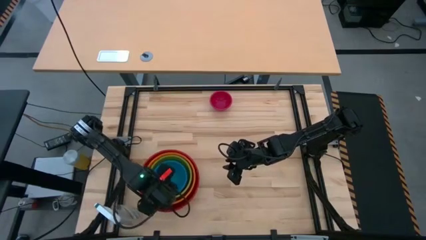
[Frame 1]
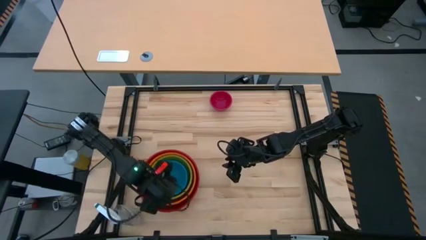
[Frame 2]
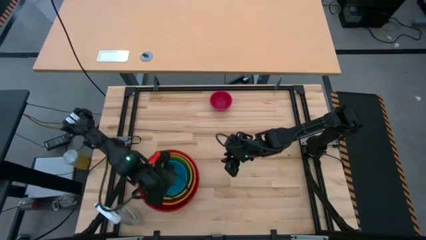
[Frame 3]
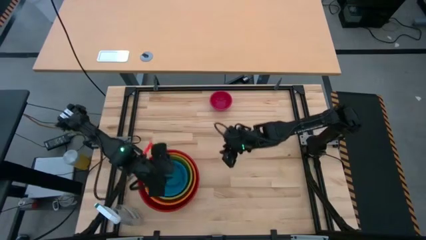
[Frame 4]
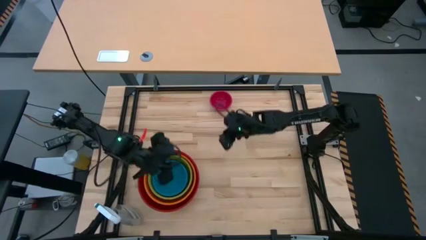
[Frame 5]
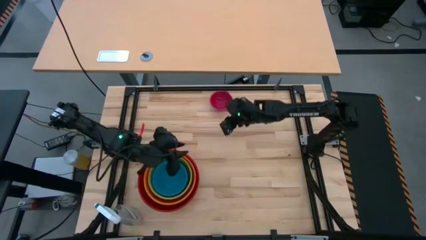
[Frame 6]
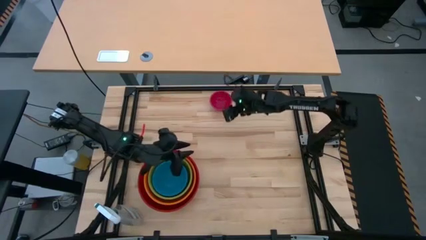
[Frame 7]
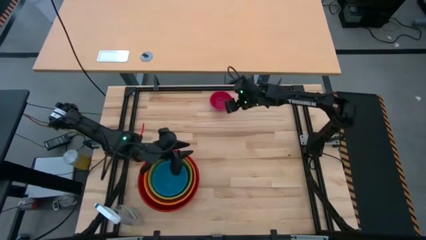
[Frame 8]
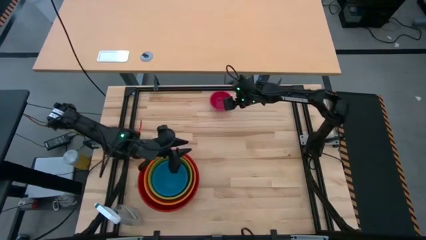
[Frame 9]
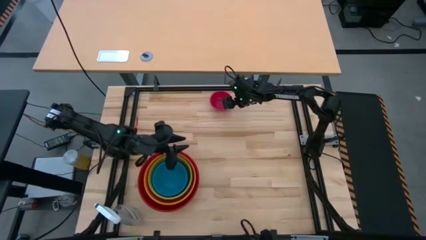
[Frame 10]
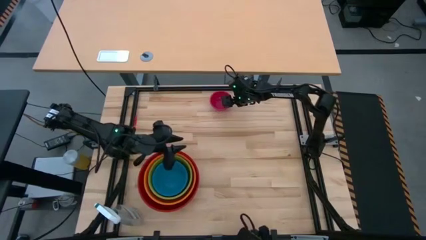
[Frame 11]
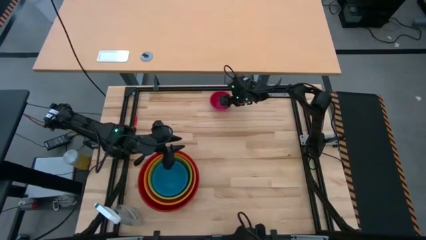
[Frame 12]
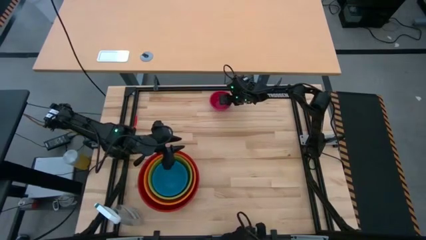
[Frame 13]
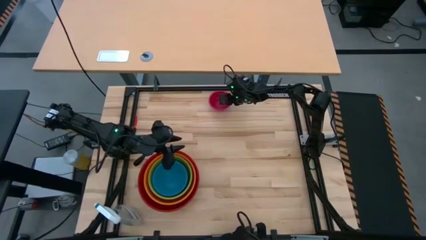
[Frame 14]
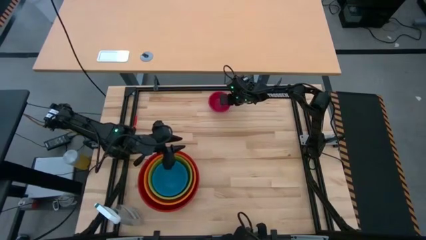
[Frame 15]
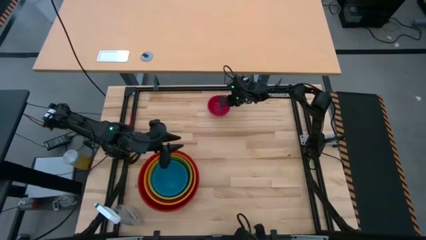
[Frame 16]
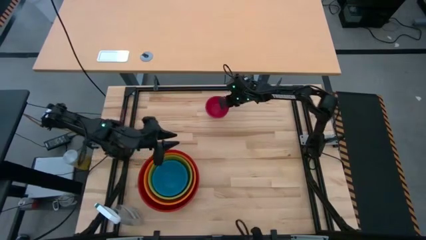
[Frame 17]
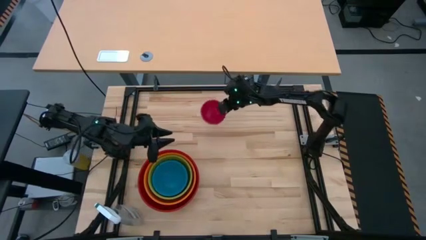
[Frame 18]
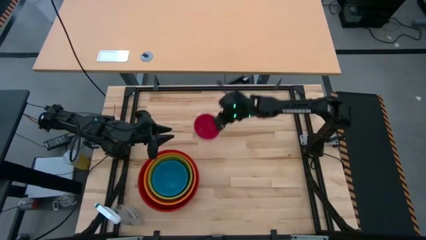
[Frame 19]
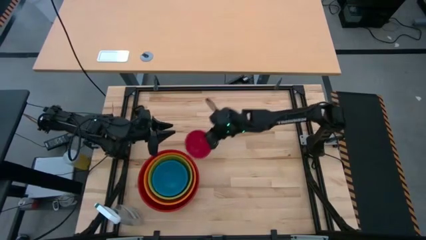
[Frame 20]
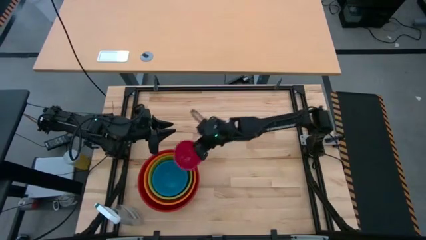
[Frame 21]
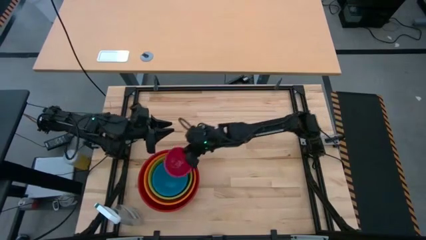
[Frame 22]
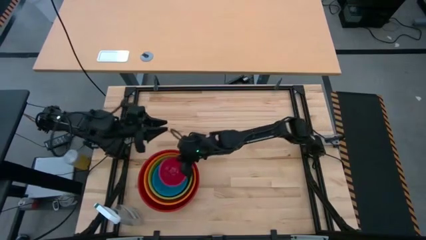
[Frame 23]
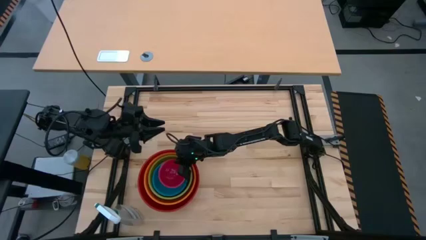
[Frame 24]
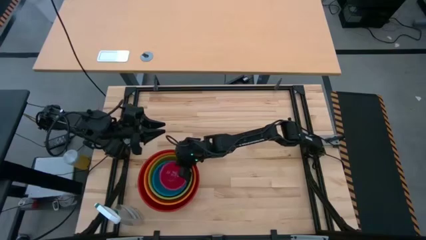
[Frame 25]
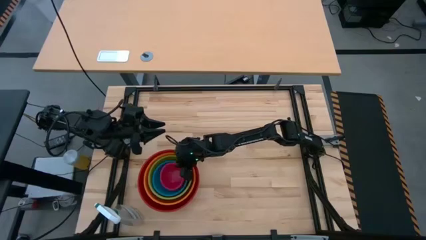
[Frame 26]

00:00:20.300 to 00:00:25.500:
Stack the pink bowl on top of the blue bowl

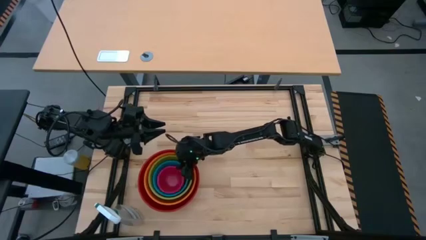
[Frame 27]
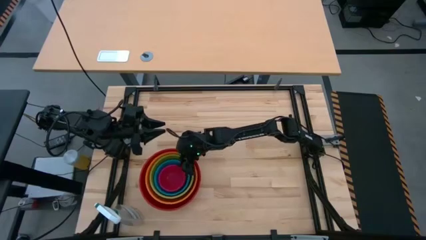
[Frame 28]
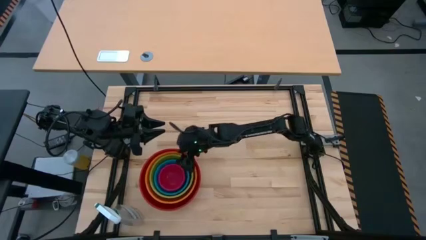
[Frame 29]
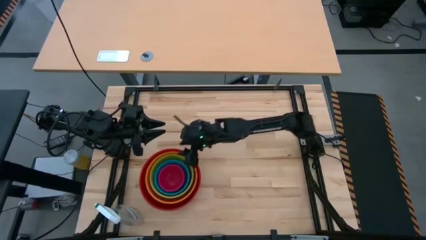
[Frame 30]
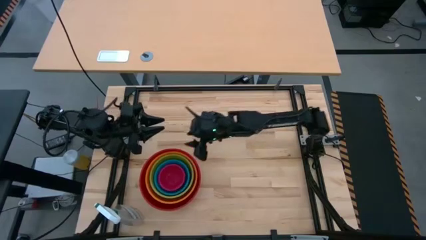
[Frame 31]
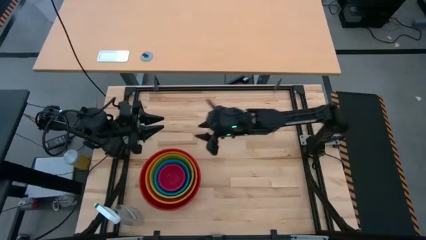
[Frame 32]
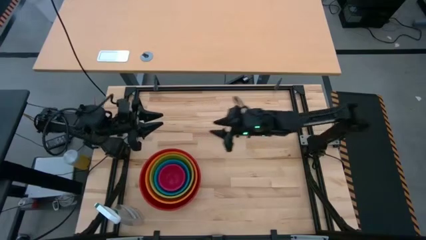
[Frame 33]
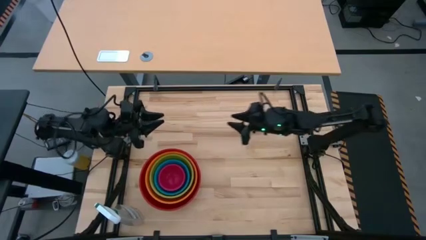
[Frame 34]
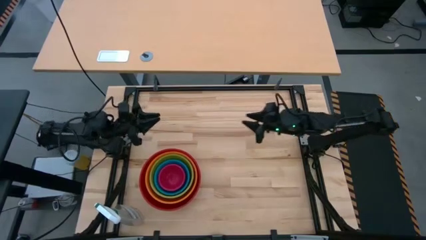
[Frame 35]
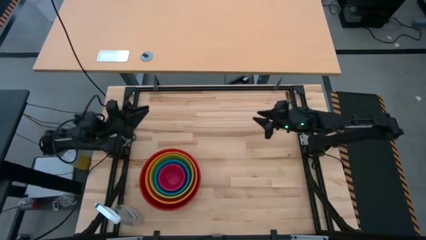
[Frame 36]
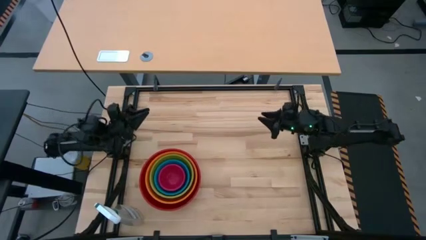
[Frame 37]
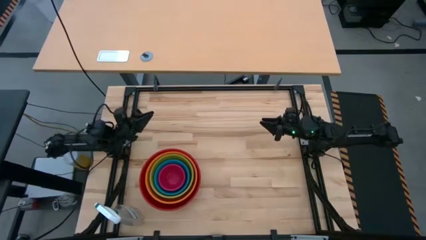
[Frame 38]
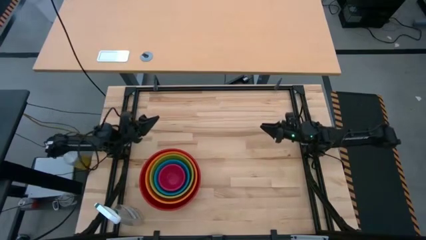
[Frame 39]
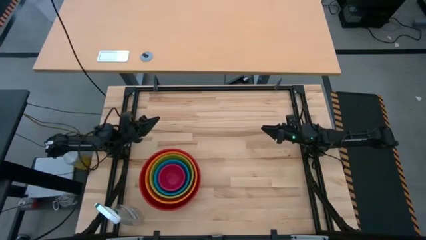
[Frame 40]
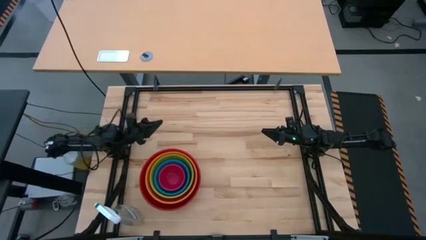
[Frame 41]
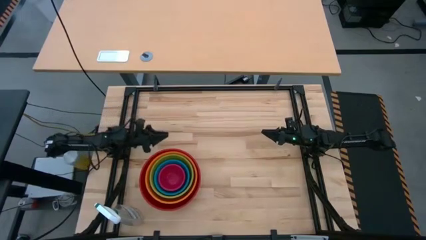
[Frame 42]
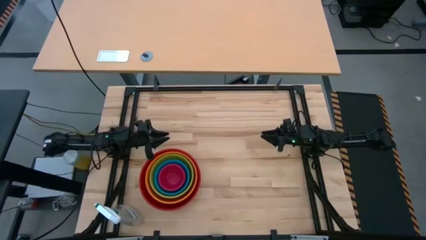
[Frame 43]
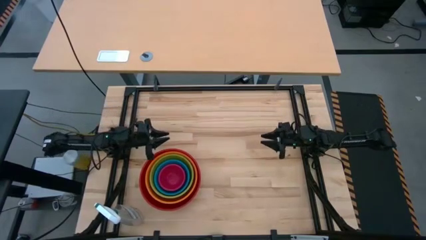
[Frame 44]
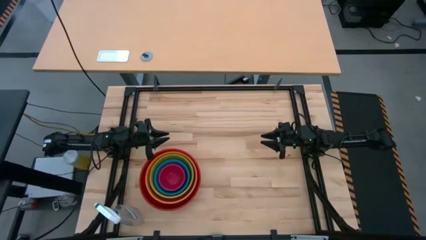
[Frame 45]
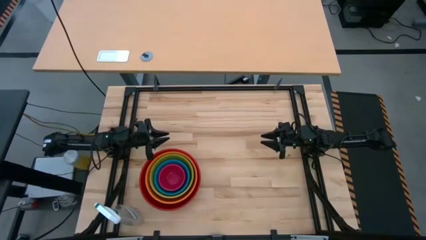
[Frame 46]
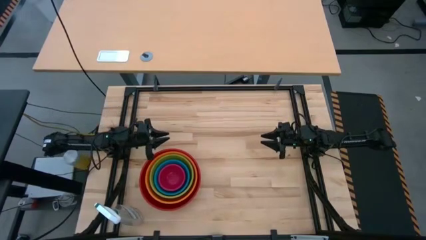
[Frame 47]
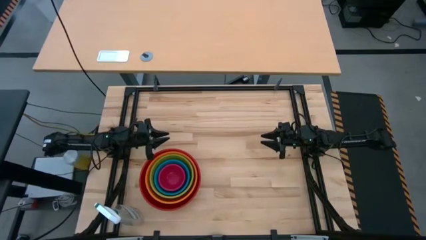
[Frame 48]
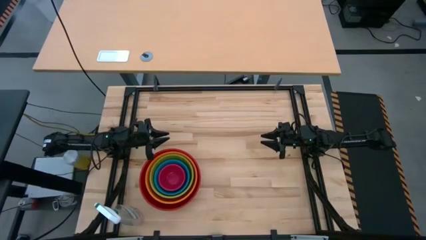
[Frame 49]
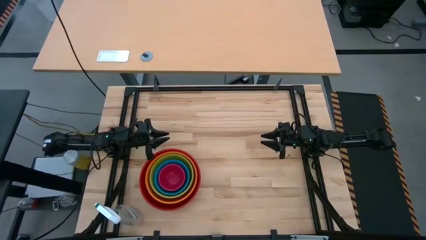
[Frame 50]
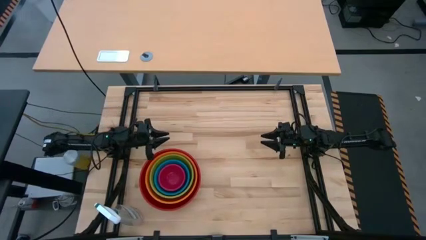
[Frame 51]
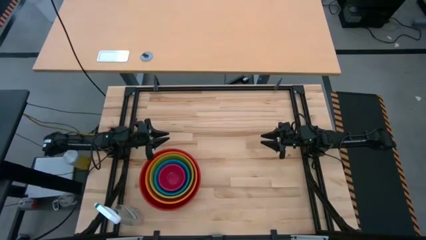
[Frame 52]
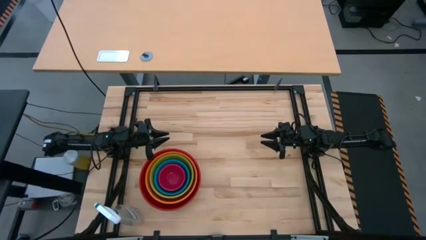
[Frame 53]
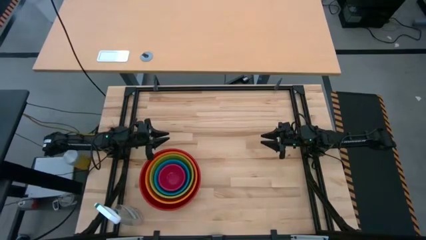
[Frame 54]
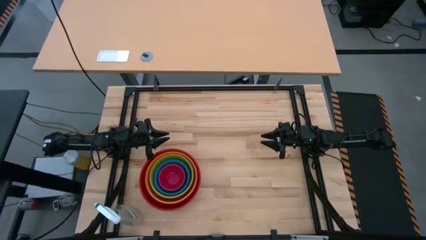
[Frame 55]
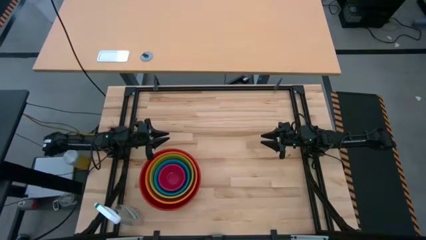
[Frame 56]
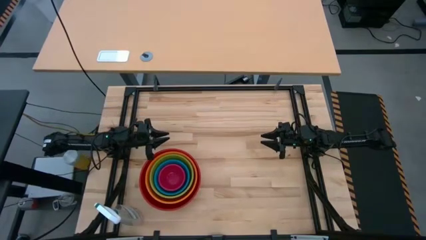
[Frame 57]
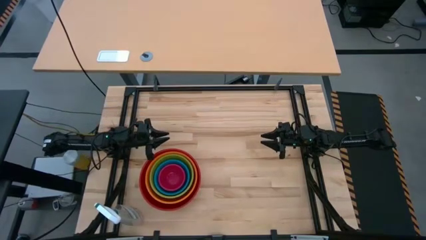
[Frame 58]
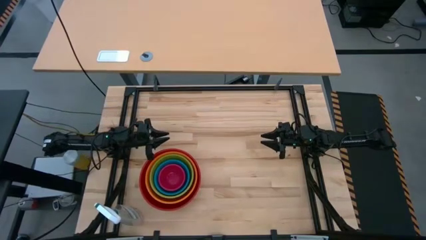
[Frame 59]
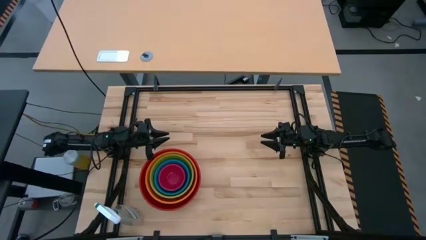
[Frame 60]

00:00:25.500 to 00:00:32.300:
Return to Home Position

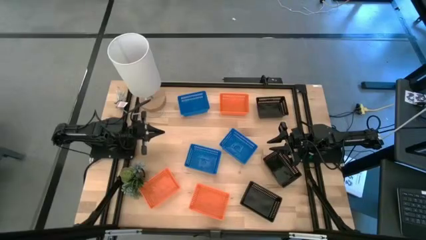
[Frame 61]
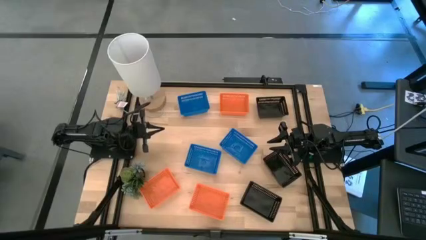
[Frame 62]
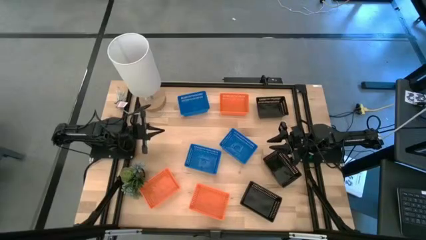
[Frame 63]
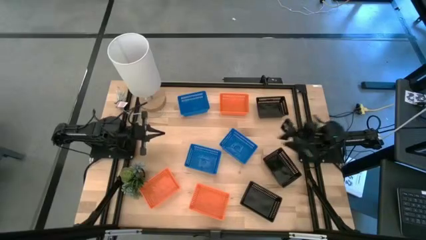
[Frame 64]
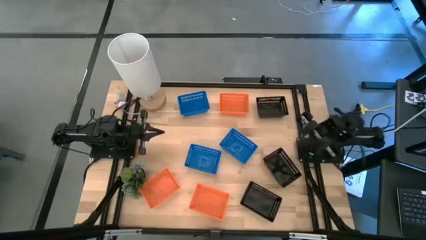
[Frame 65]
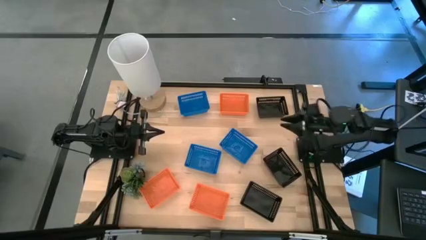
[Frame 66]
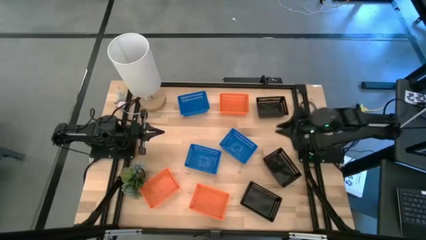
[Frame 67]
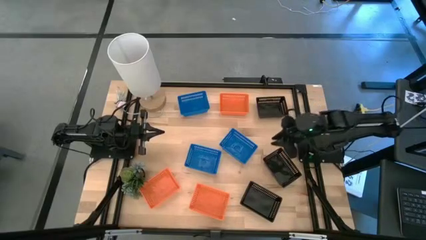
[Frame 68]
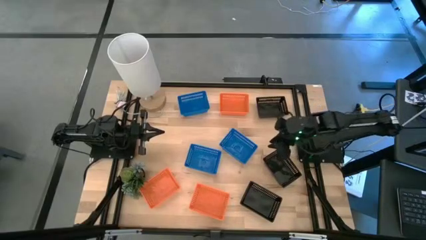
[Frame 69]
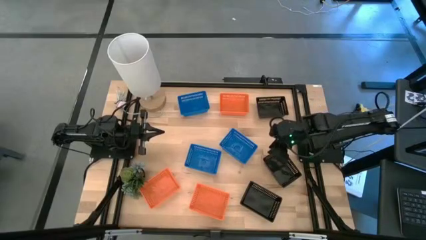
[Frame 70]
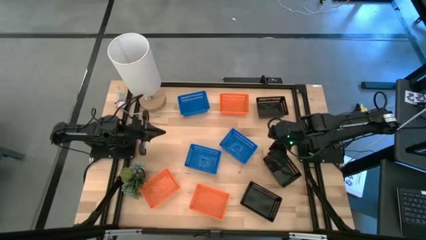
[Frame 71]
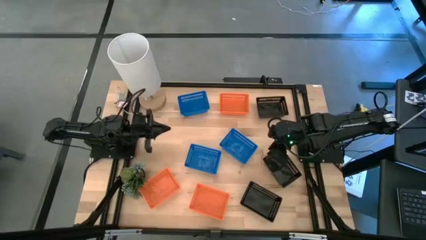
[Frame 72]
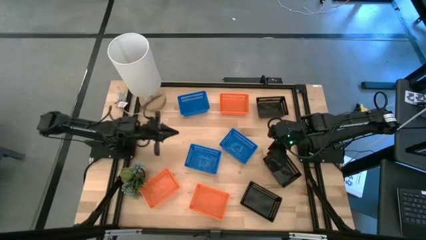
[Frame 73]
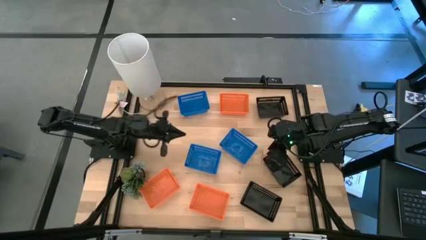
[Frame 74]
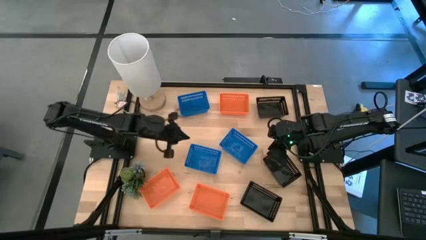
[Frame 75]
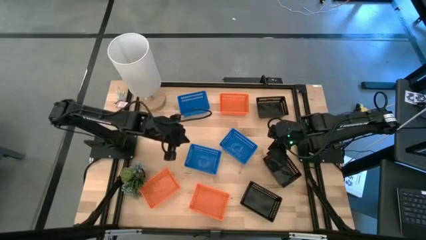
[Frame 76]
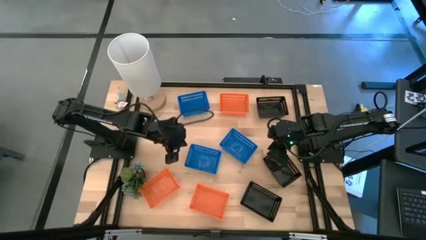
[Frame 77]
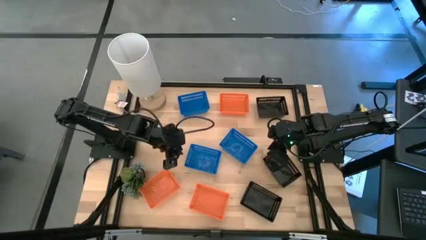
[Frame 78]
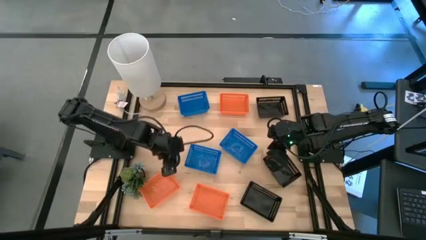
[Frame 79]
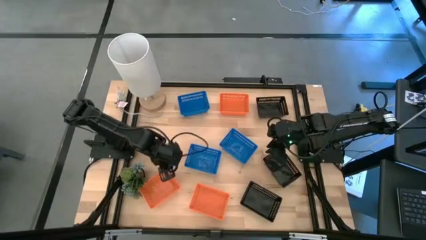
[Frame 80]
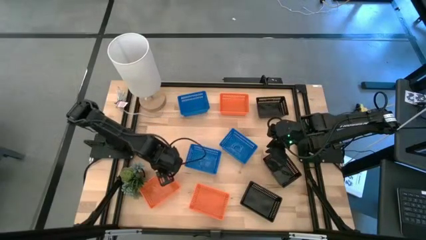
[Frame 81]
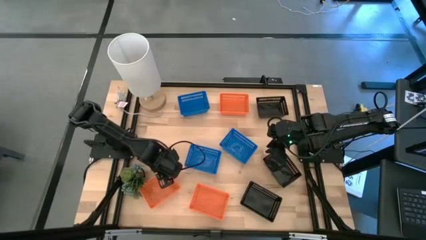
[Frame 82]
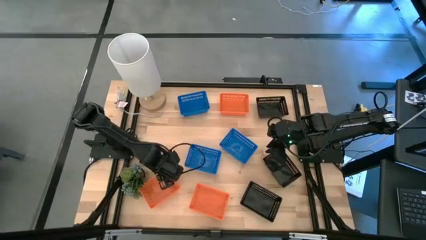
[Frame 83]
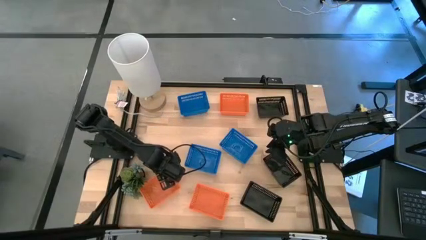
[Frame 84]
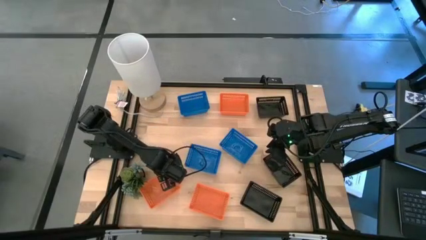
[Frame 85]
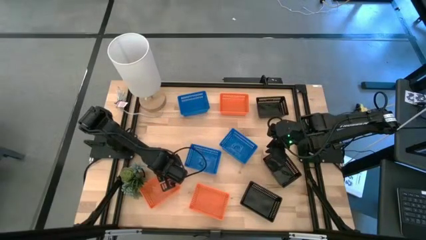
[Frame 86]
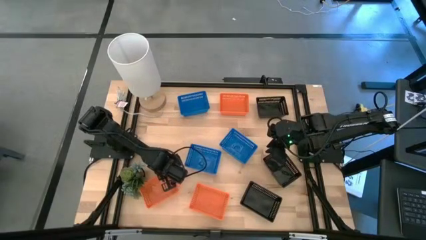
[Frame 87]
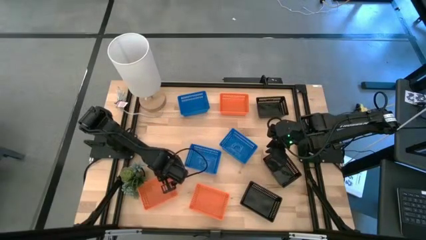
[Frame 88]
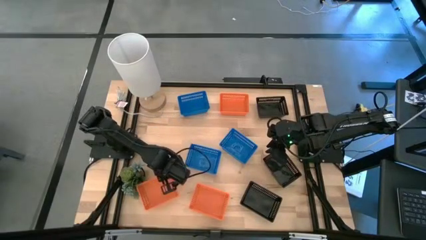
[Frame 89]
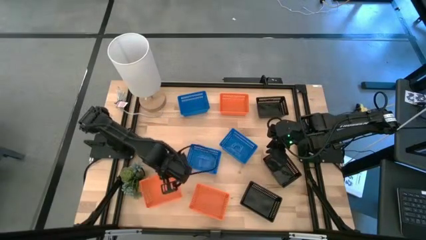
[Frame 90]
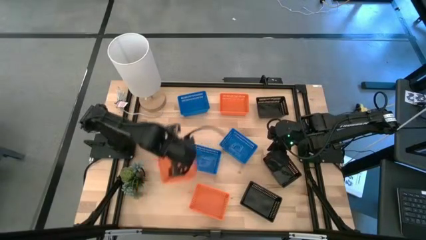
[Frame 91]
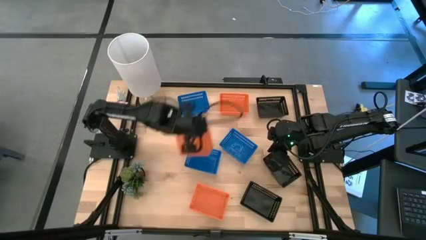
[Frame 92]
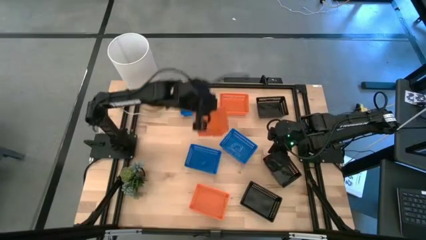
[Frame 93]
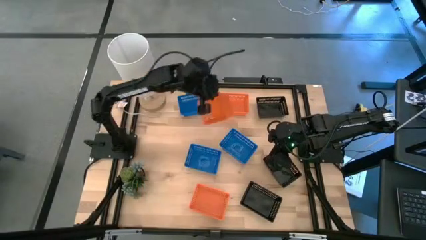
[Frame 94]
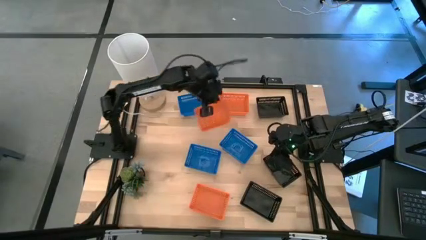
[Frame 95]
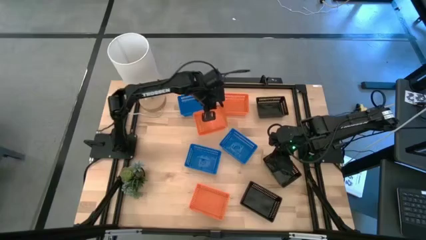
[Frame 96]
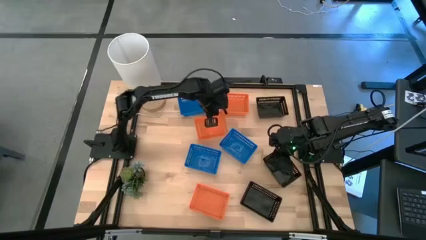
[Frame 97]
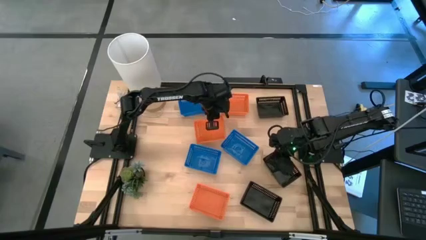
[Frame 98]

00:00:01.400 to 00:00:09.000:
Move the bottom left orange bin to the center of the table
